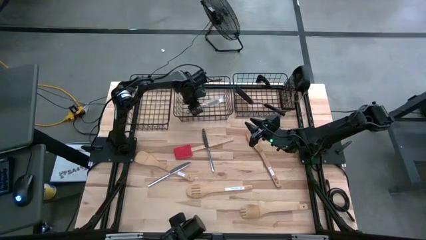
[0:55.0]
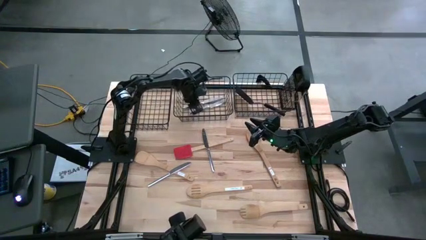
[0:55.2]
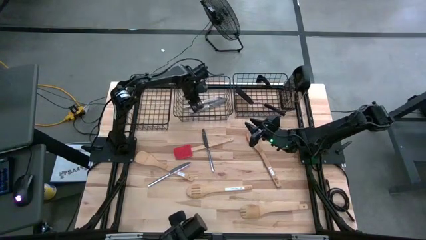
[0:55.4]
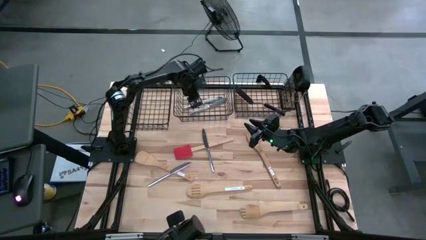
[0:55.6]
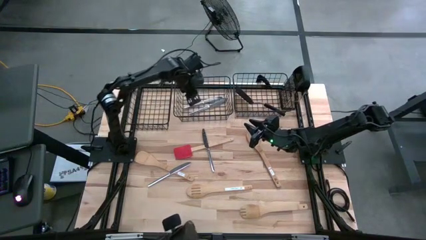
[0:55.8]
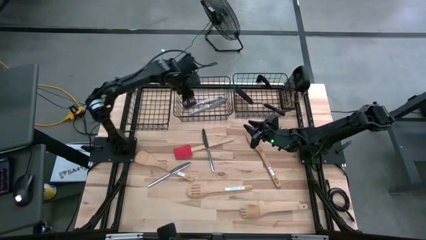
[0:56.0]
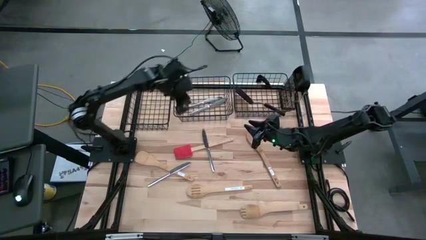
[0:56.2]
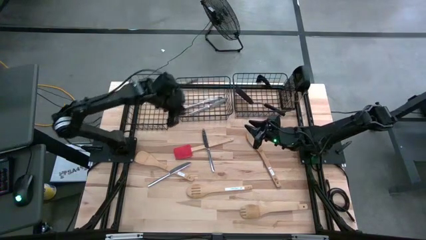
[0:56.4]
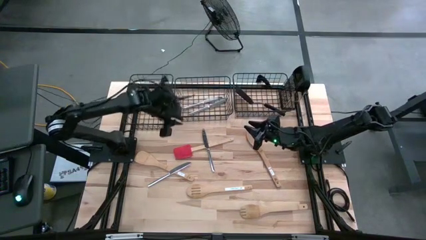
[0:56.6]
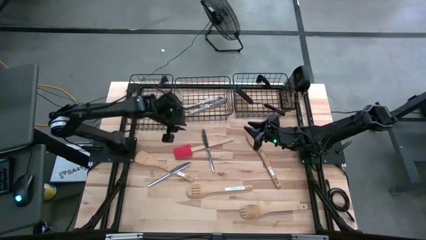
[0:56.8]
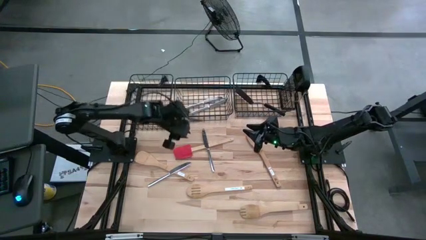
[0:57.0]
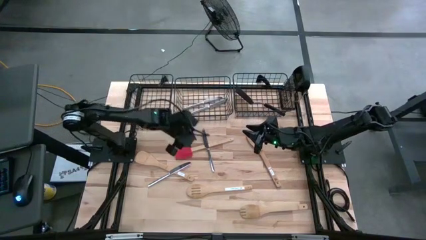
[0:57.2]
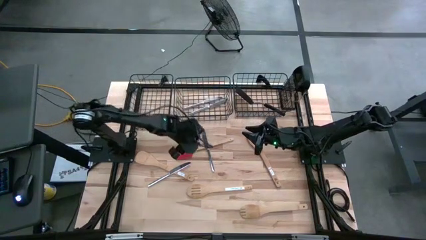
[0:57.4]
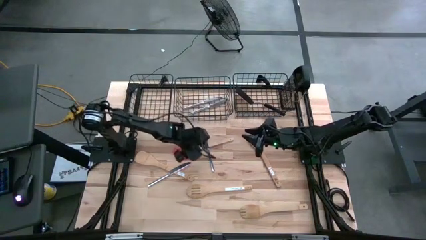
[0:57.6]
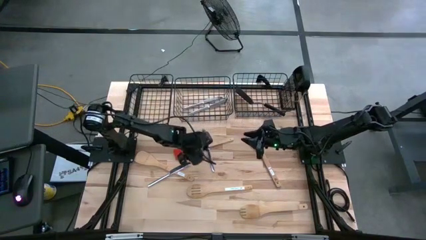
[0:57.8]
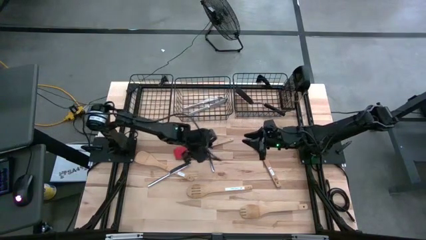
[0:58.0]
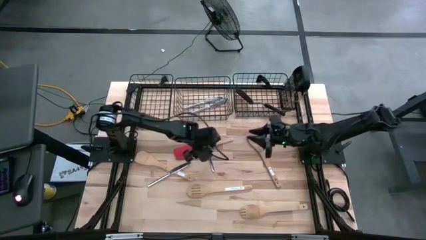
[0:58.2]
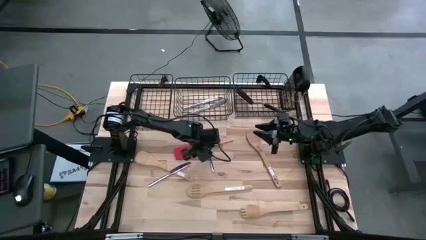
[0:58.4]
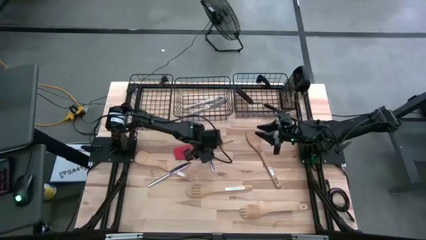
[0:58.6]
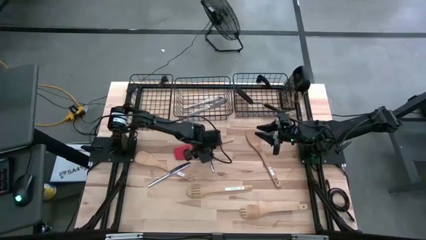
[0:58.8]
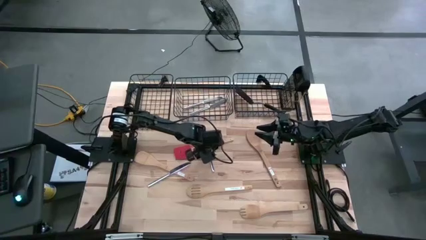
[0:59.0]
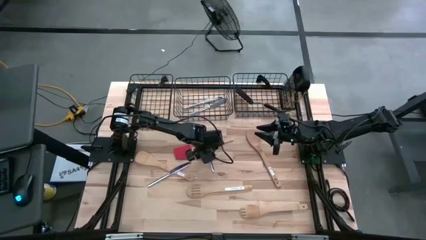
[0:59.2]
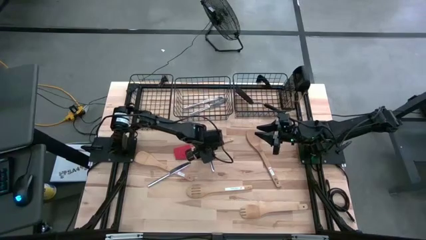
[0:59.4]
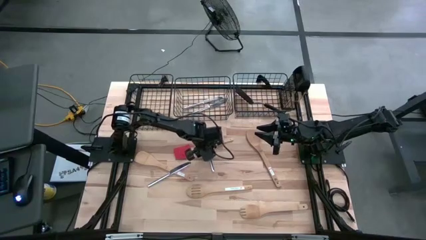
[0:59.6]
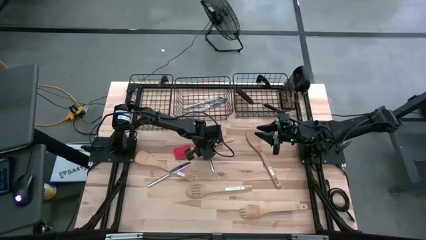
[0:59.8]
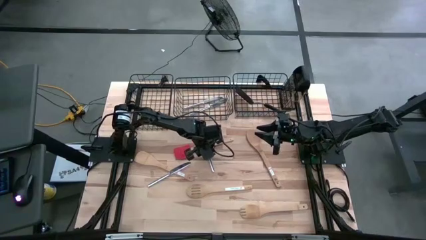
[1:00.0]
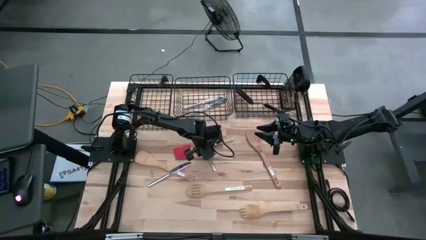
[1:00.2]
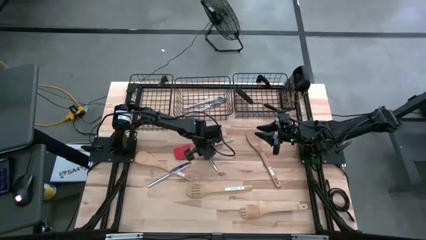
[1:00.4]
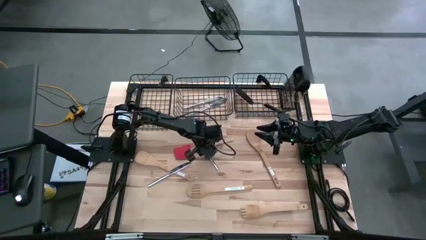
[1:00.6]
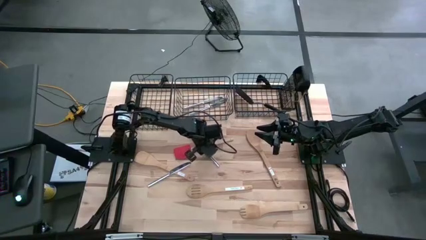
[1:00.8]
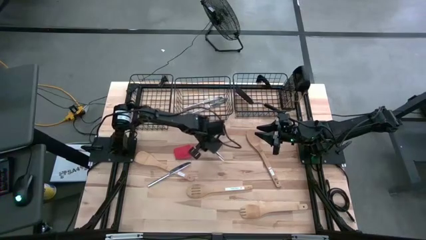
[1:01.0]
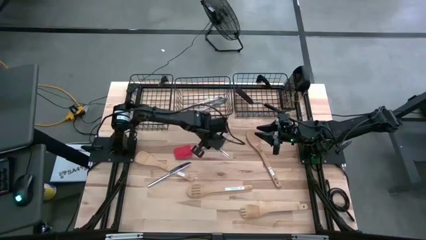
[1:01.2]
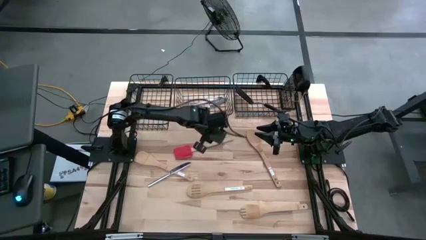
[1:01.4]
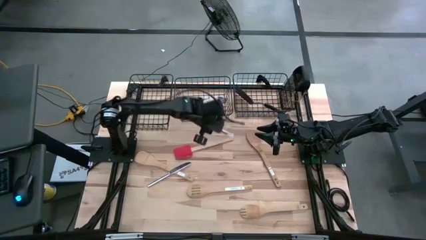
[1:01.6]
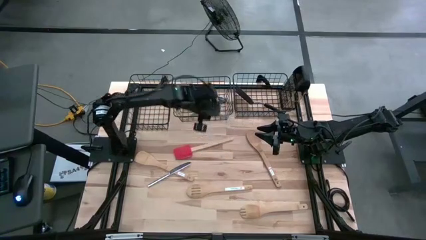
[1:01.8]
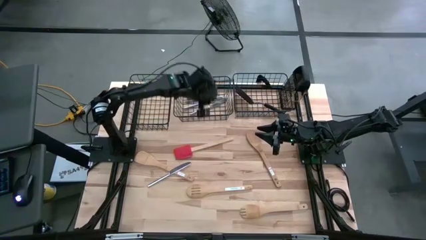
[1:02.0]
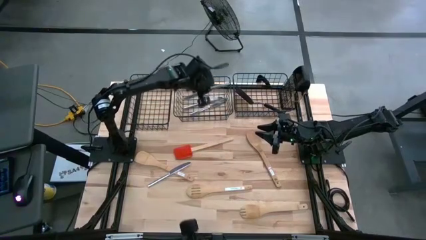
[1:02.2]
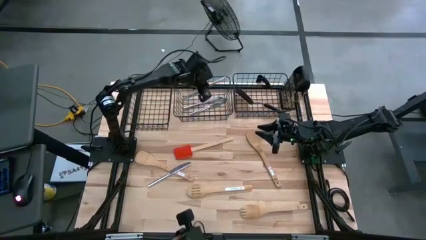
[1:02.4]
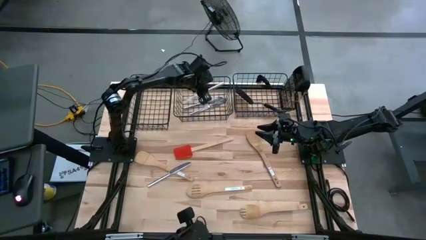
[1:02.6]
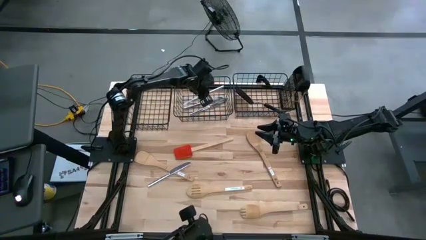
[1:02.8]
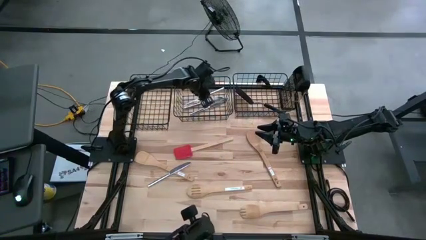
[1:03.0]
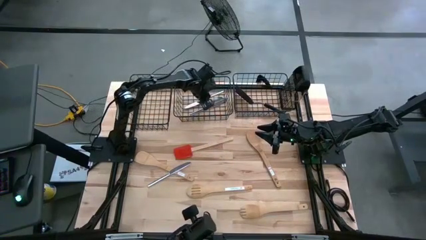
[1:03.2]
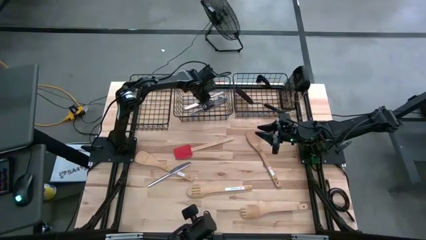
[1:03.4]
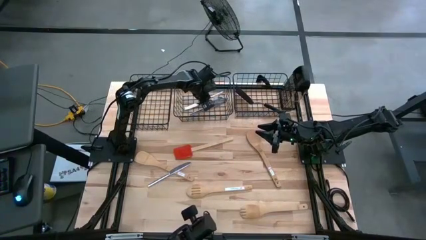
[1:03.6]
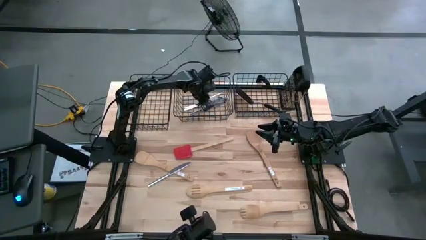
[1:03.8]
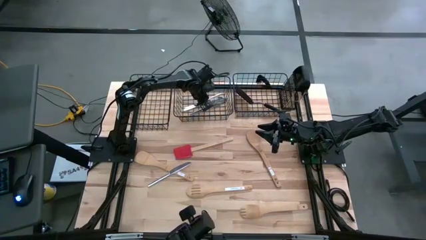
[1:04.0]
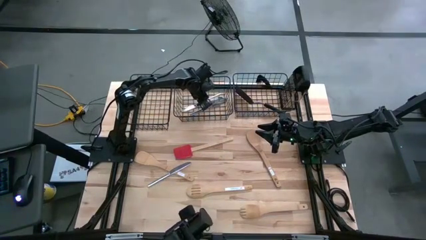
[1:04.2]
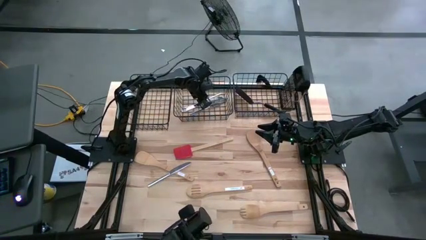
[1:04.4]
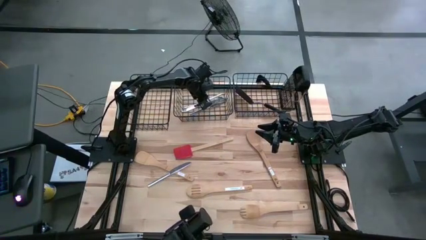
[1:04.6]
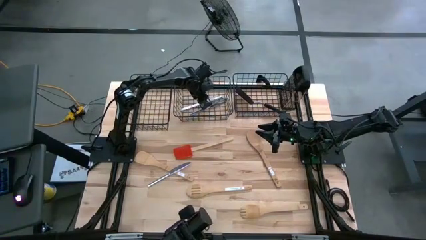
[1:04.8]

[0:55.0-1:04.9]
Task: Pick & Place Kitchen Items
Put the table knife into the middle wire basket

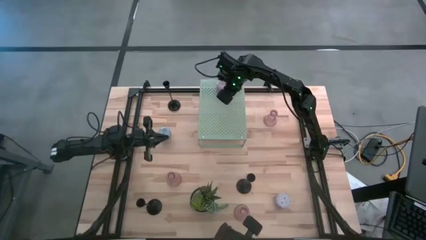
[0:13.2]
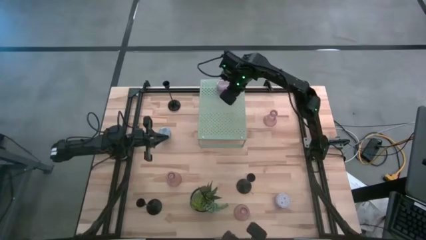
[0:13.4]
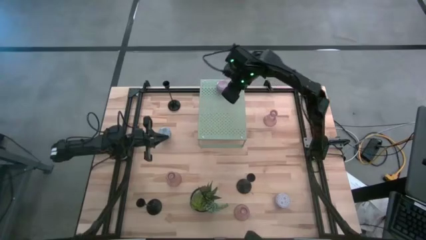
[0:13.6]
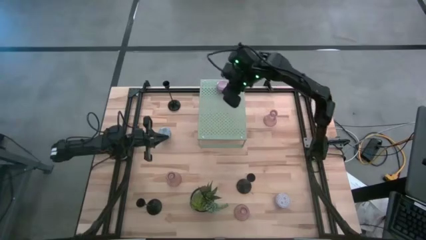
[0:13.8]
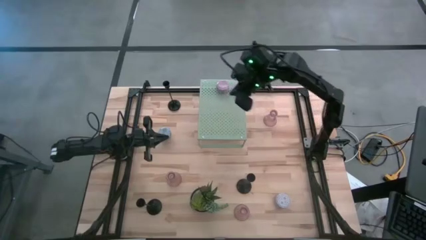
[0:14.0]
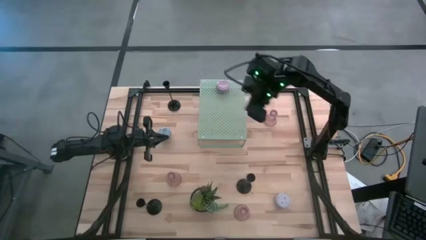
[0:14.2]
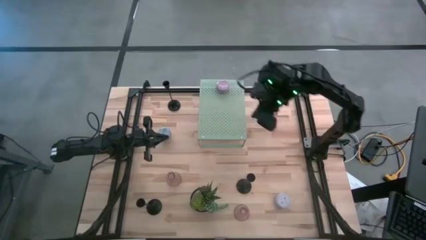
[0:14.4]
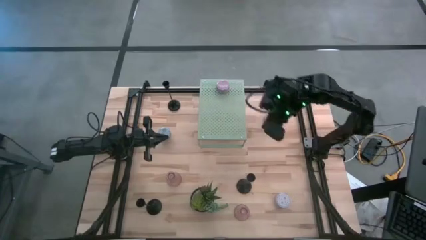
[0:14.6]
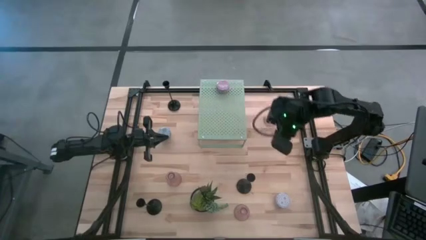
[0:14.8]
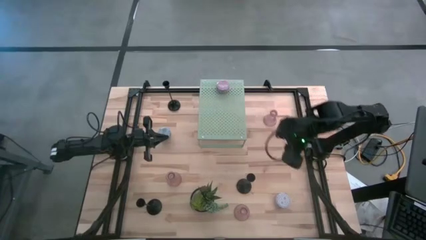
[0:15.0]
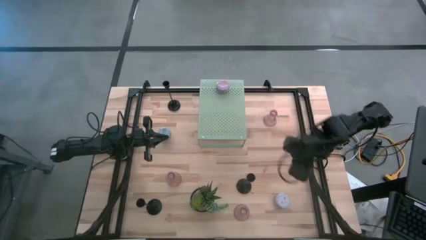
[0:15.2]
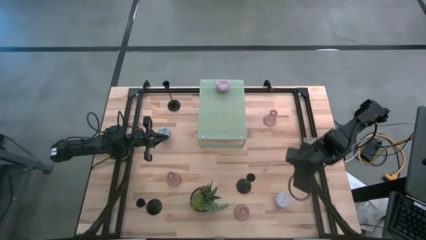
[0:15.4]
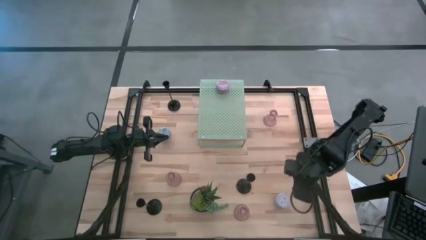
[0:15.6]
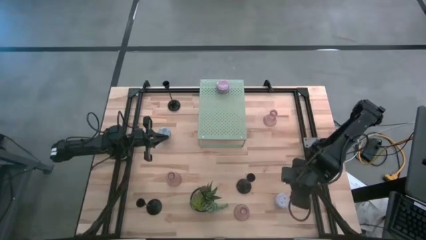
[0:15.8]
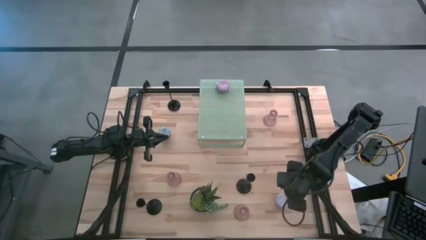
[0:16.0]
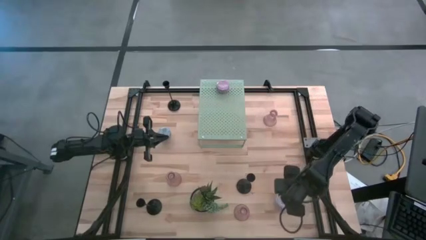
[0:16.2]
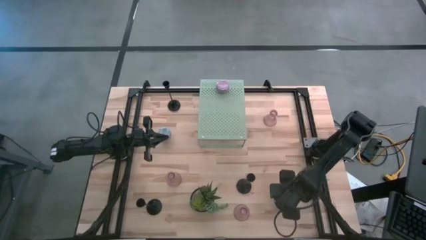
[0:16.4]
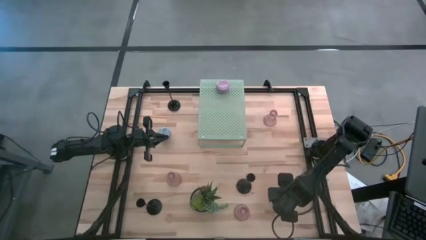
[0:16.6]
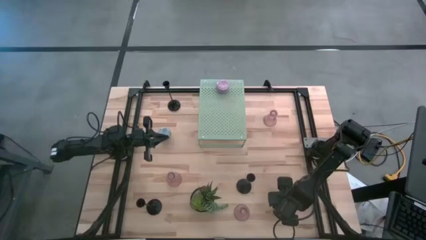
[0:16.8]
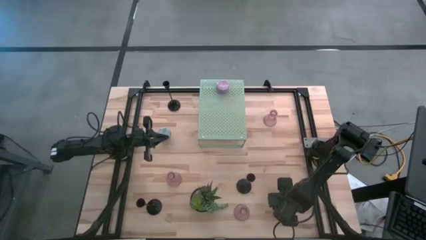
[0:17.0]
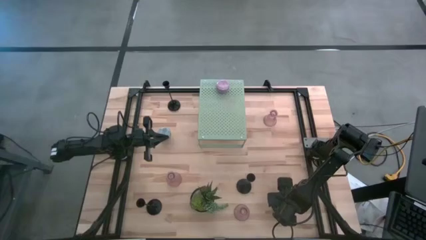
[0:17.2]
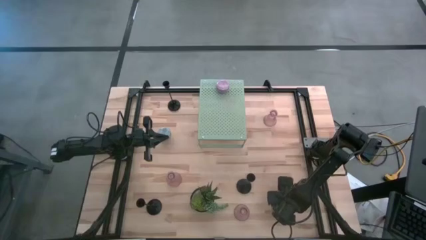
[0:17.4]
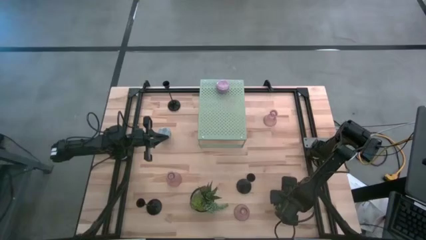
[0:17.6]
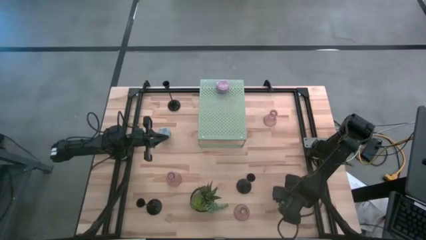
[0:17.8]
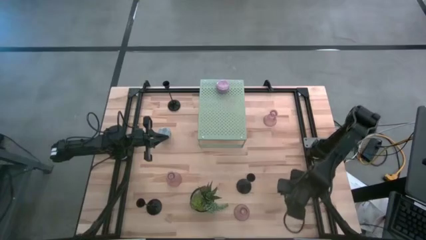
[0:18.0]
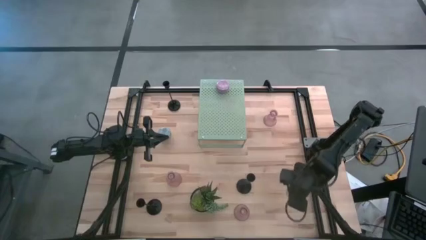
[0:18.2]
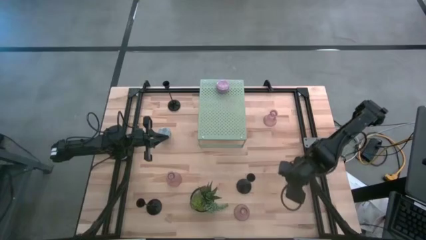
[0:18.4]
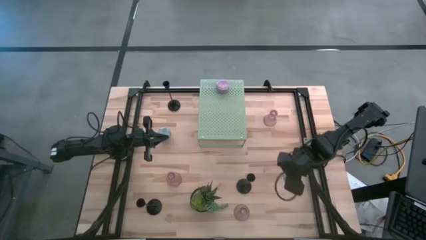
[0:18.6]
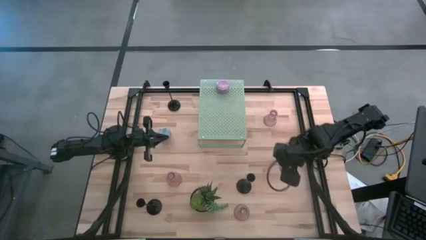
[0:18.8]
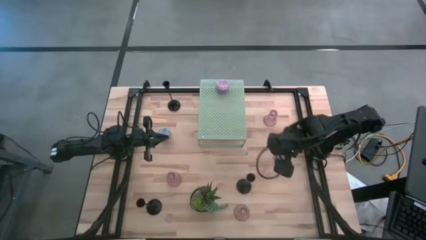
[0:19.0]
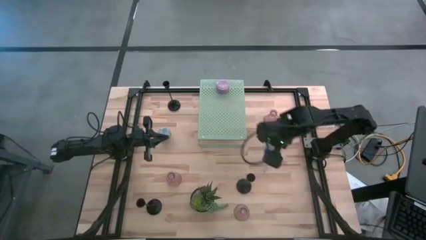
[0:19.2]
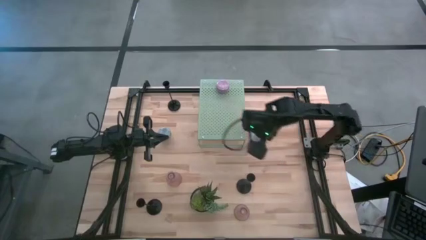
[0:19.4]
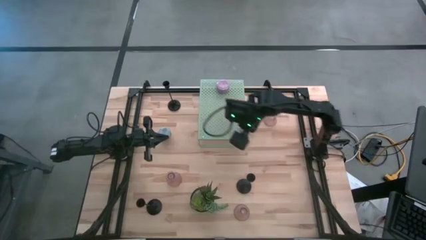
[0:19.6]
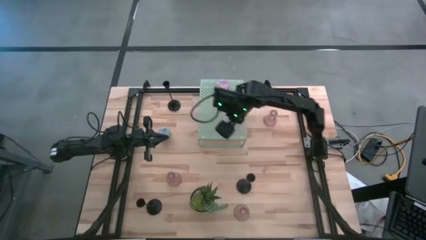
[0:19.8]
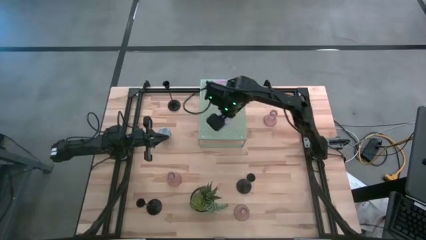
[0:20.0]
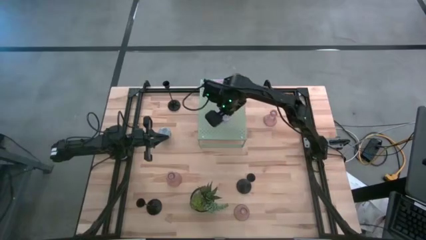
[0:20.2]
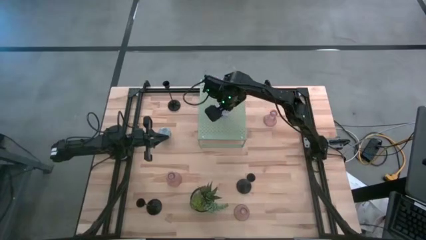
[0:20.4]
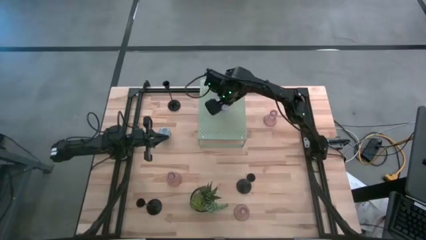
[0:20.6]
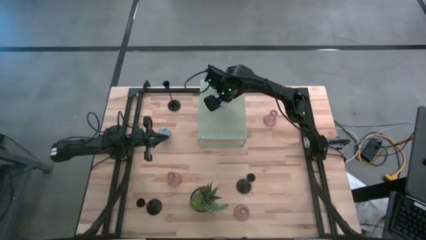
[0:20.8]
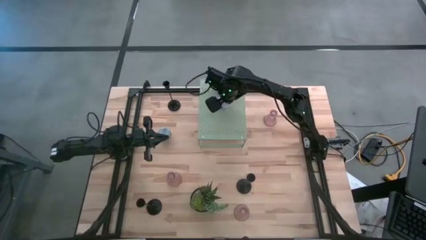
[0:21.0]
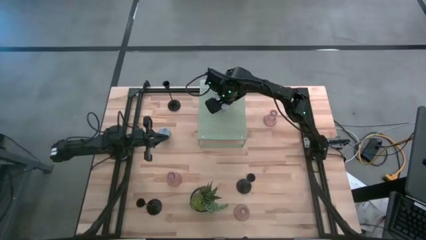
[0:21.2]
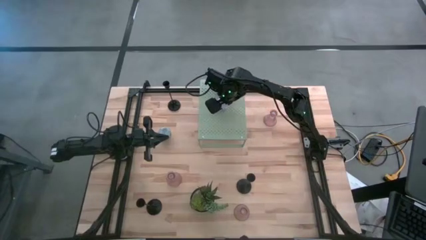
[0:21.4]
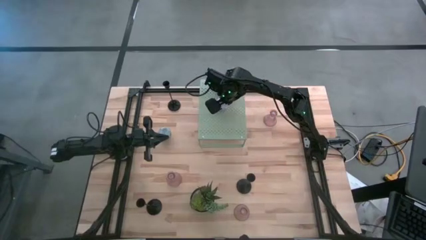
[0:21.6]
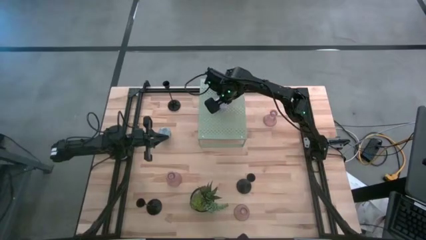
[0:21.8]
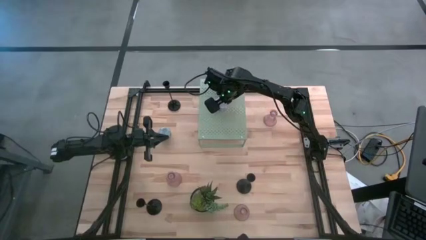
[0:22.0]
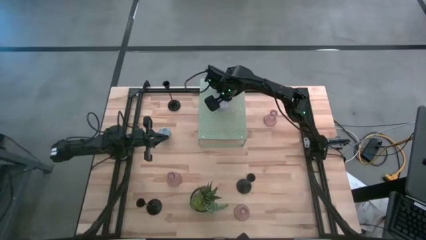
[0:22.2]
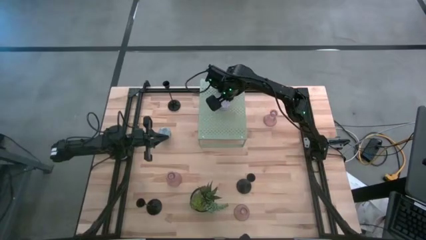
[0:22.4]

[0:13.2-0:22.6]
Task: Pick & Place candle stick holders
Put the white scented candle on the shelf aligned with the pink scented candle
